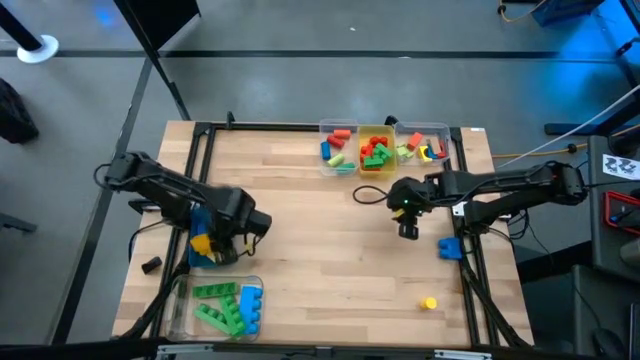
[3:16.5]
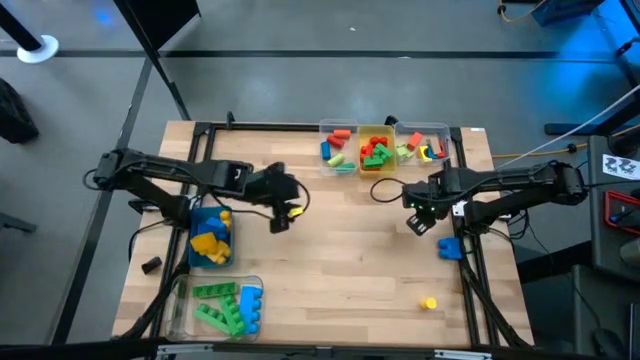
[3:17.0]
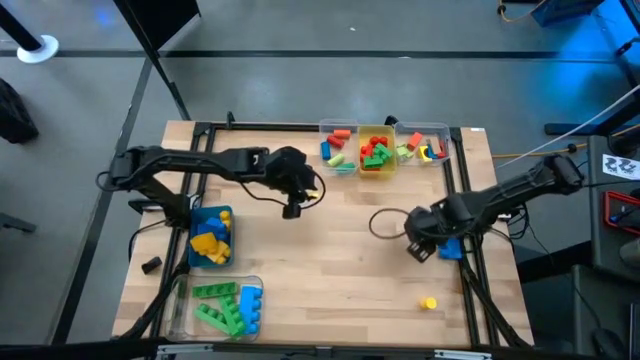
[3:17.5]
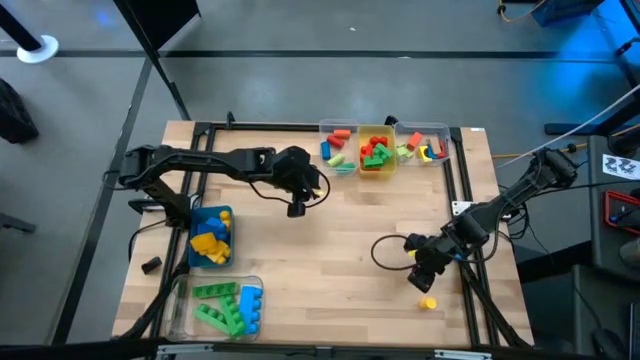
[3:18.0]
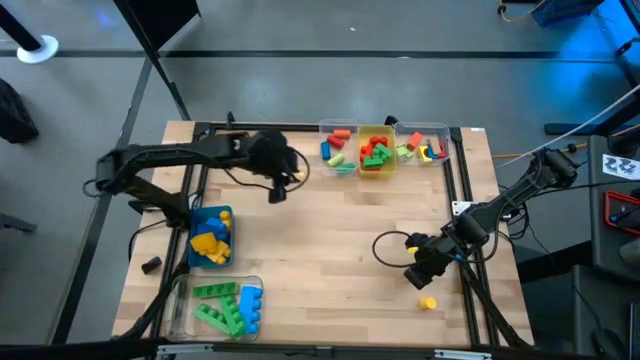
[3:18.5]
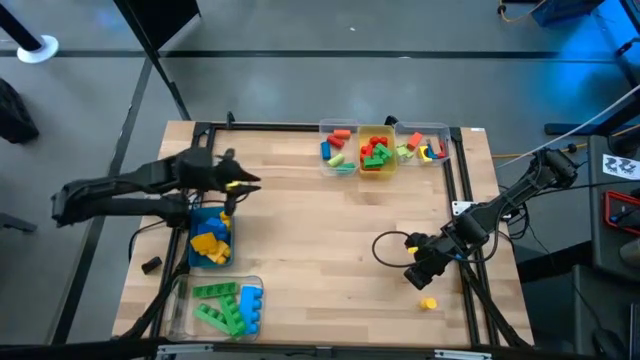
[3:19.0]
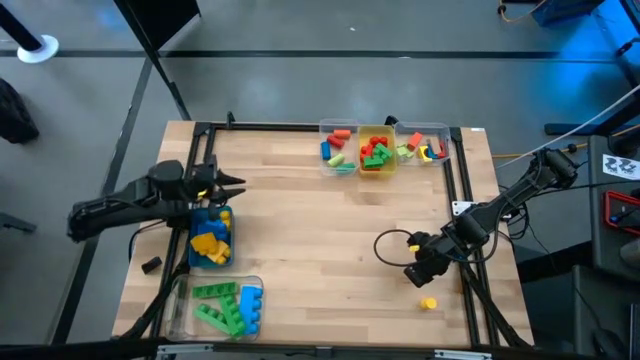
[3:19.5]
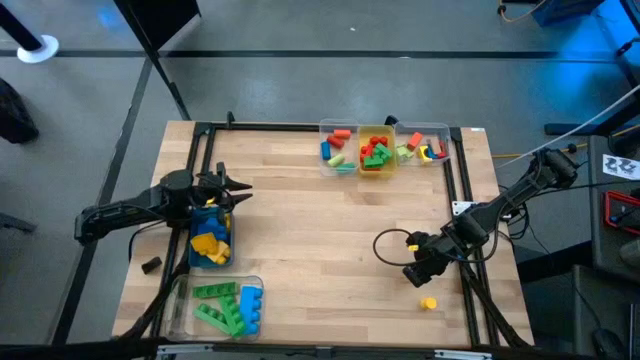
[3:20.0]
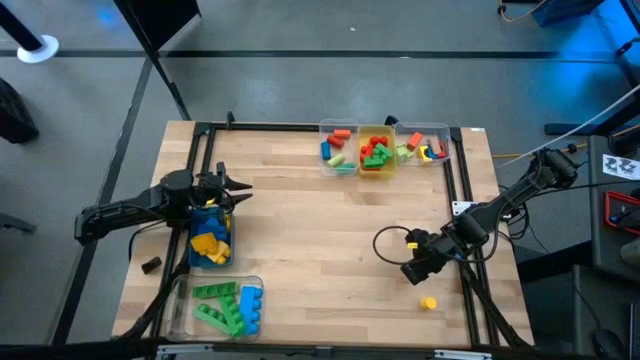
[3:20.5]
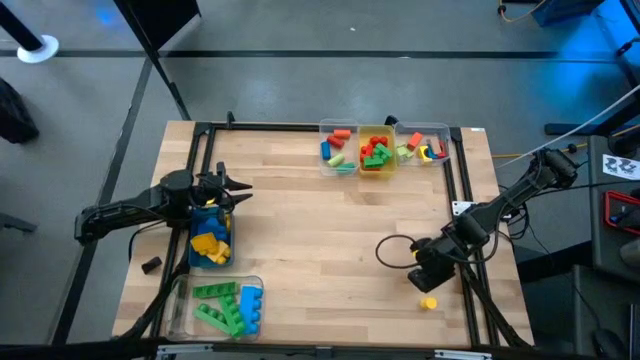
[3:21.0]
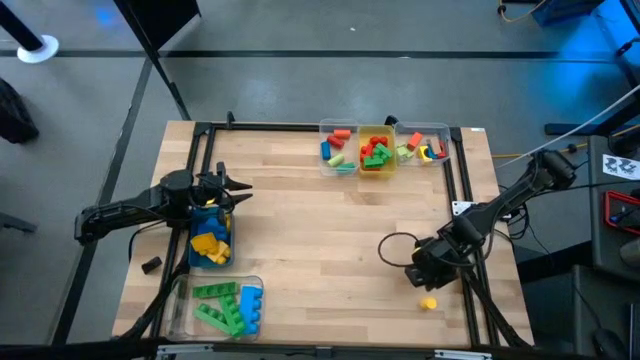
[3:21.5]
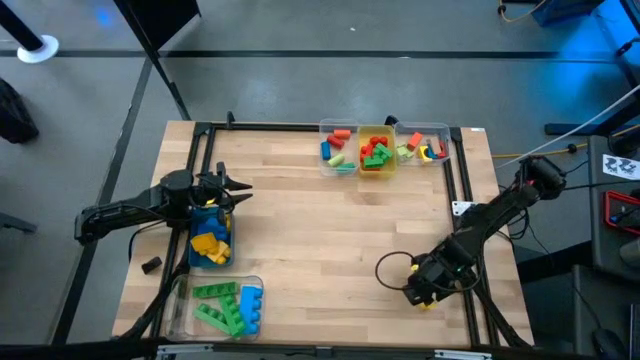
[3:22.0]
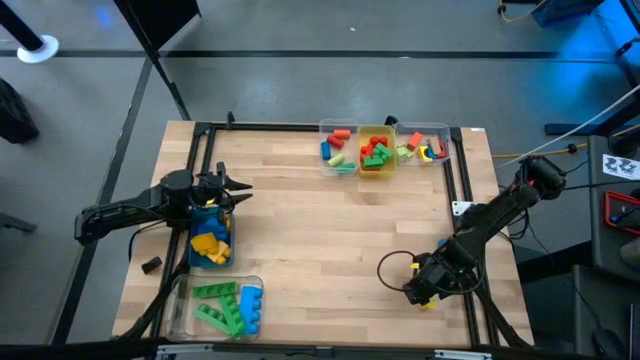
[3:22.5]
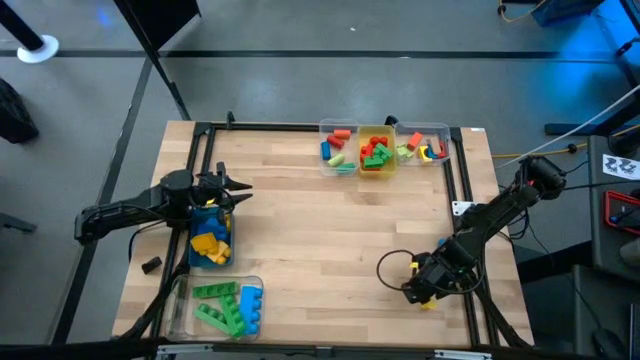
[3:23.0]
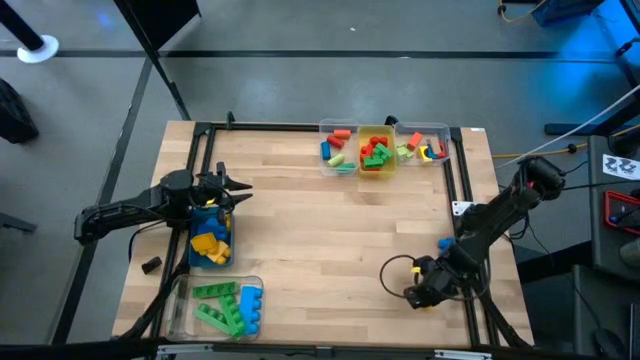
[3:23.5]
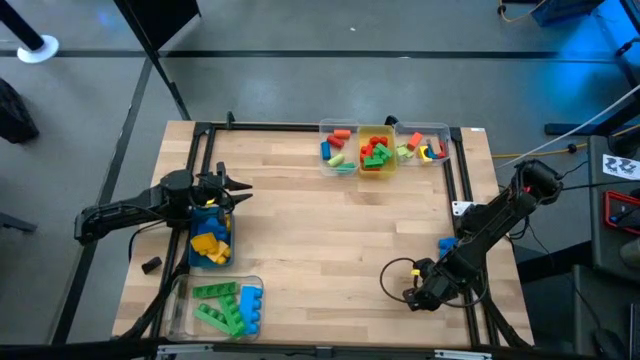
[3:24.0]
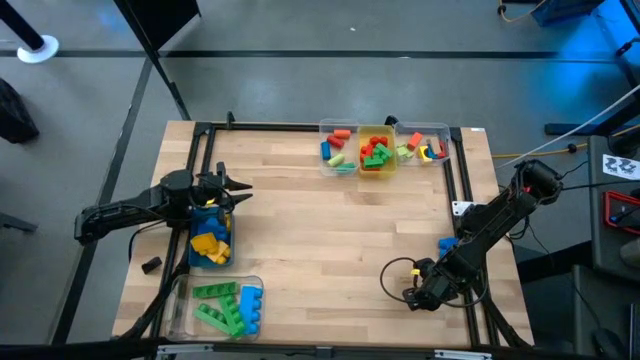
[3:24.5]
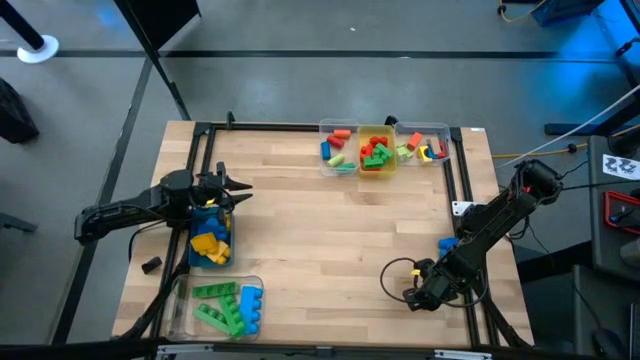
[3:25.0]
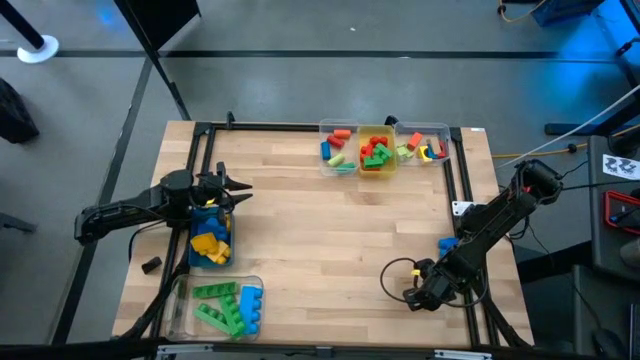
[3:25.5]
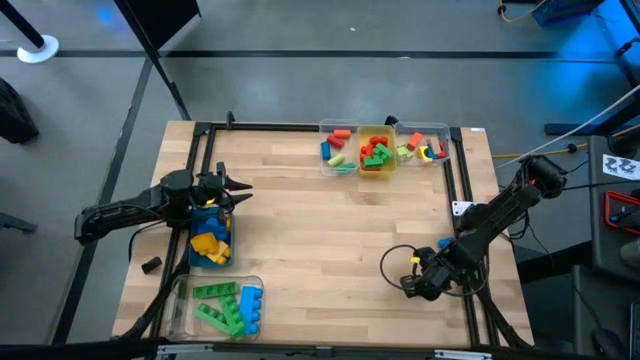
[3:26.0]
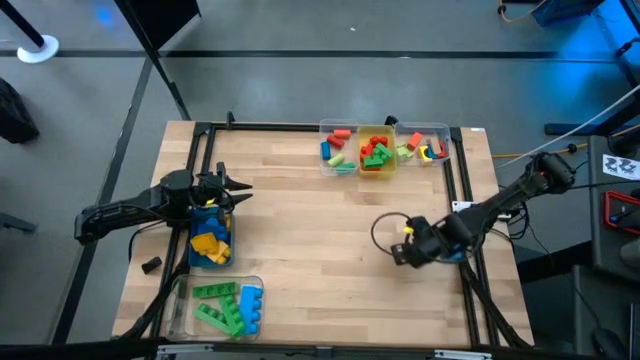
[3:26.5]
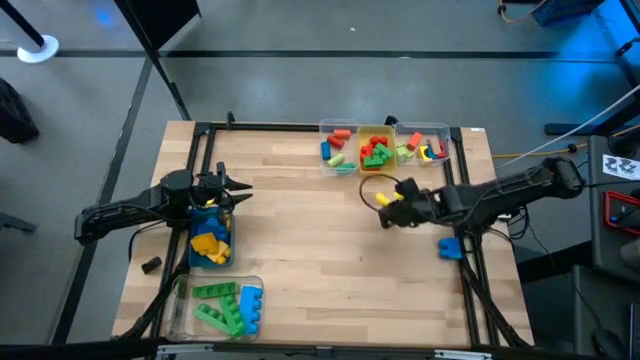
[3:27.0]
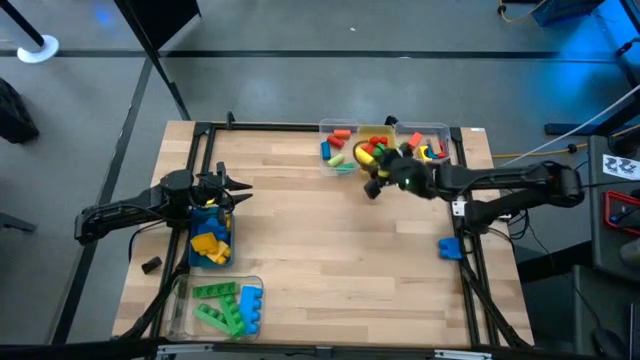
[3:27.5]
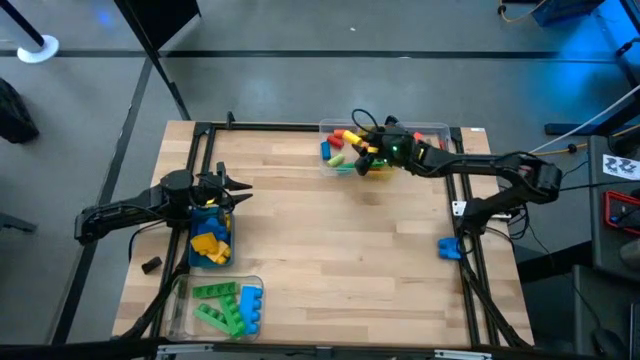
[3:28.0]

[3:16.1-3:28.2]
Task: Sort blocks by size
Put the yellow cylindrical block into the top left transparent bin

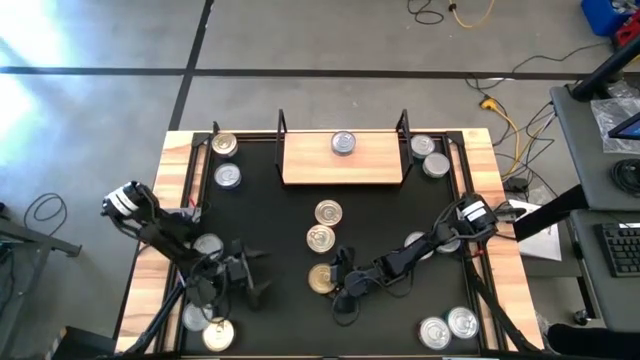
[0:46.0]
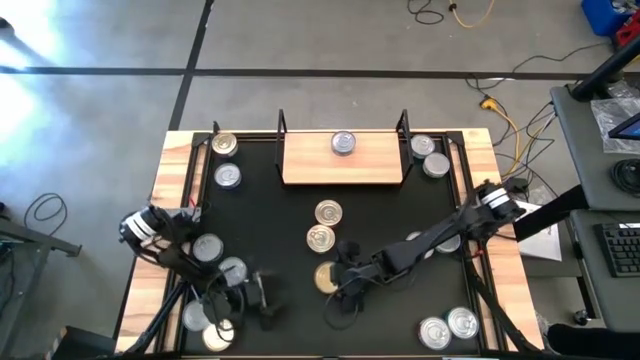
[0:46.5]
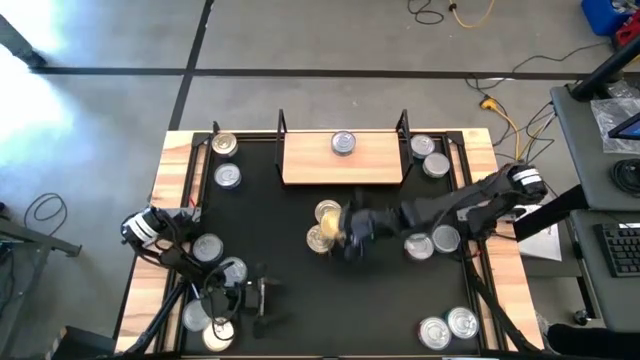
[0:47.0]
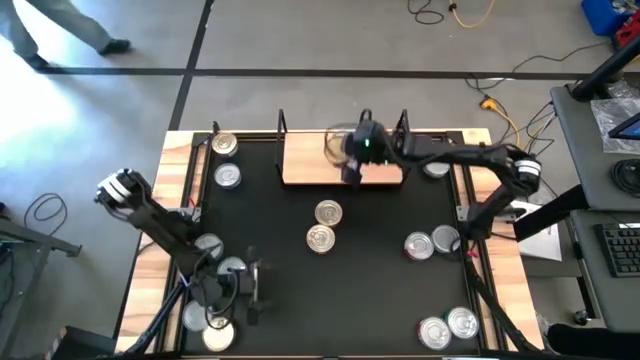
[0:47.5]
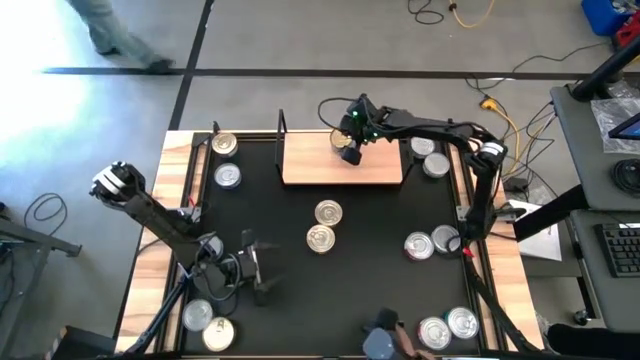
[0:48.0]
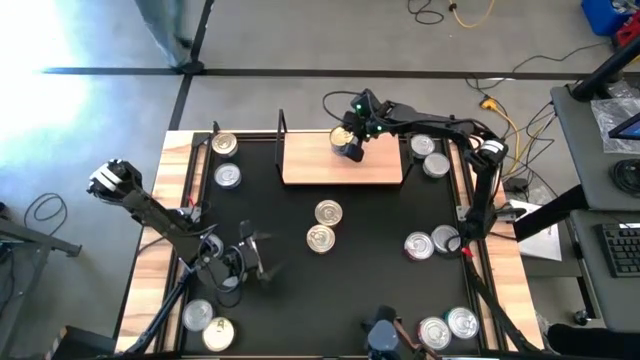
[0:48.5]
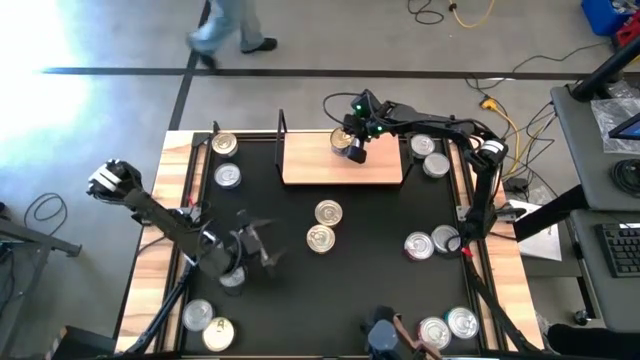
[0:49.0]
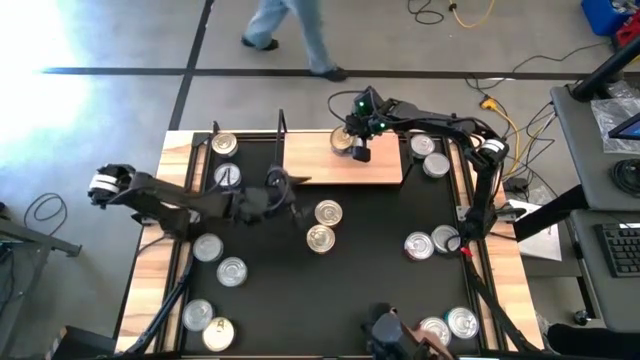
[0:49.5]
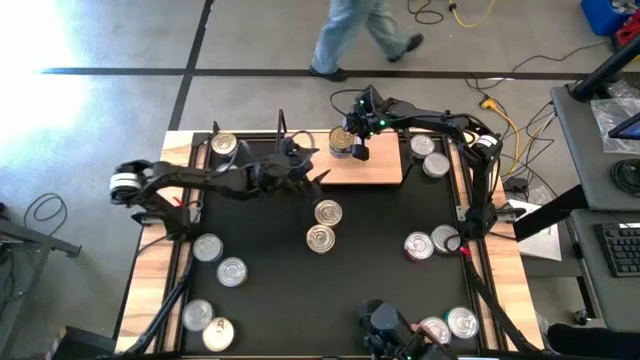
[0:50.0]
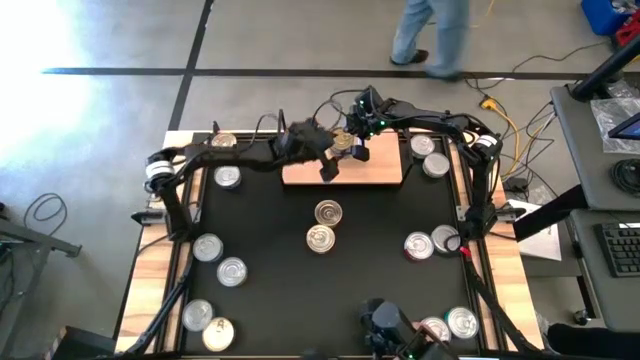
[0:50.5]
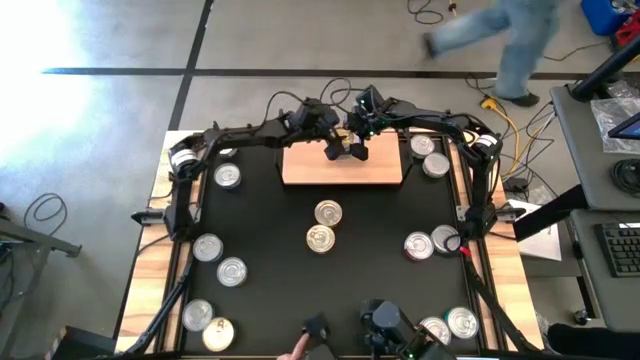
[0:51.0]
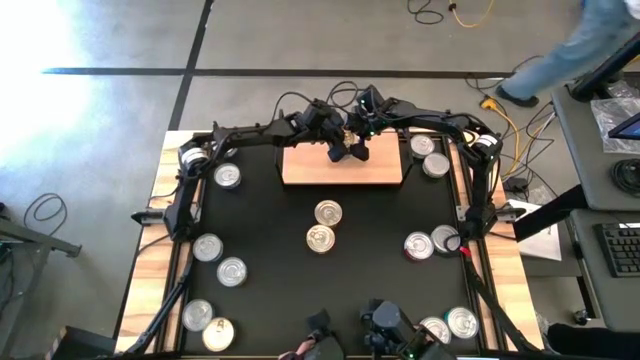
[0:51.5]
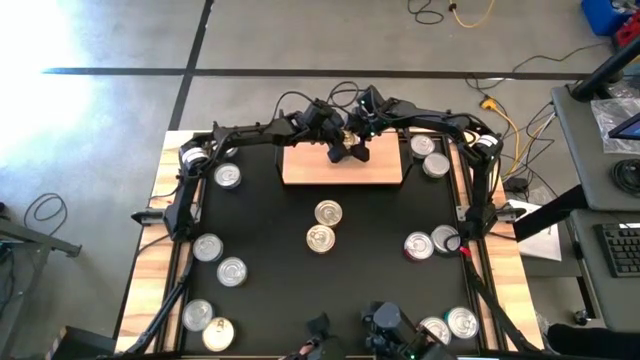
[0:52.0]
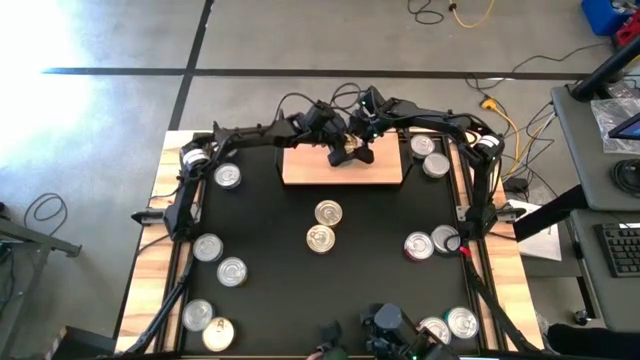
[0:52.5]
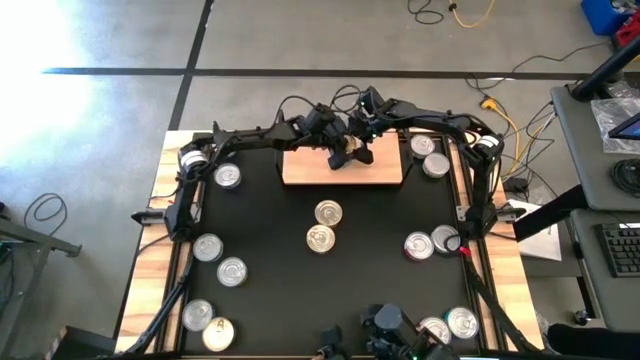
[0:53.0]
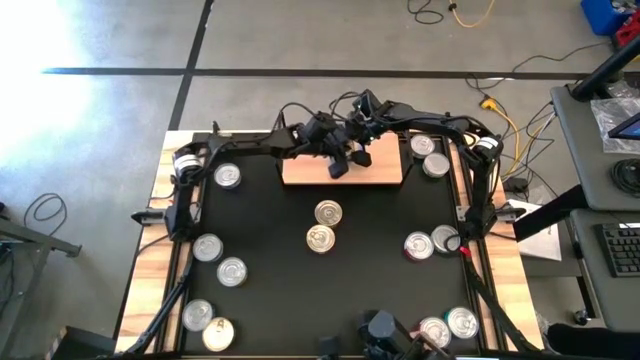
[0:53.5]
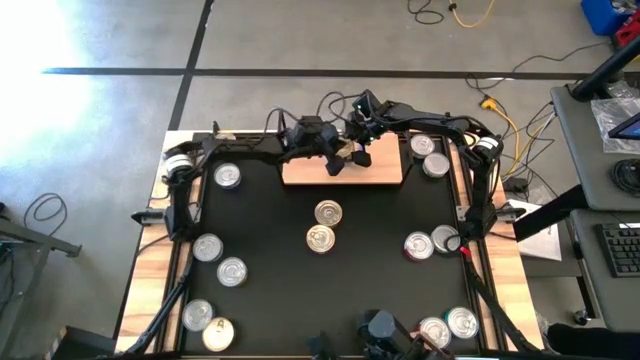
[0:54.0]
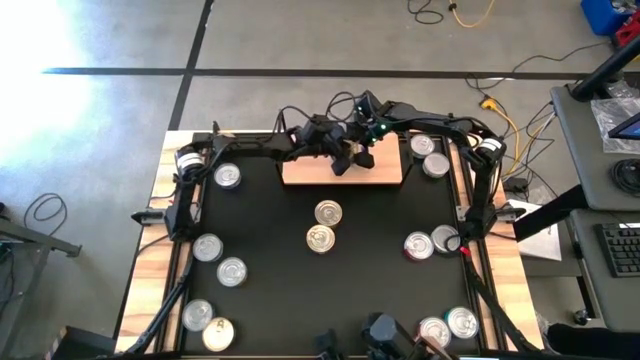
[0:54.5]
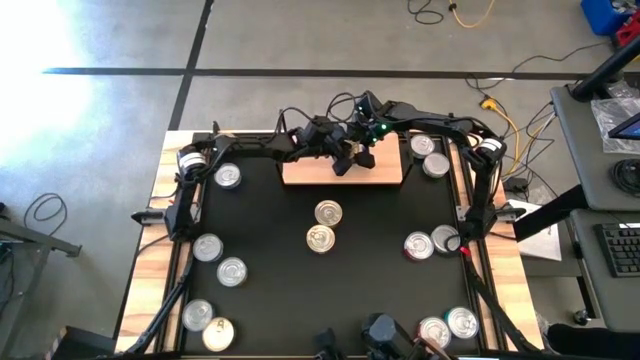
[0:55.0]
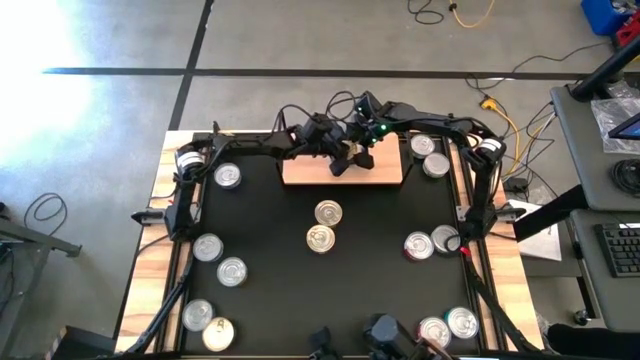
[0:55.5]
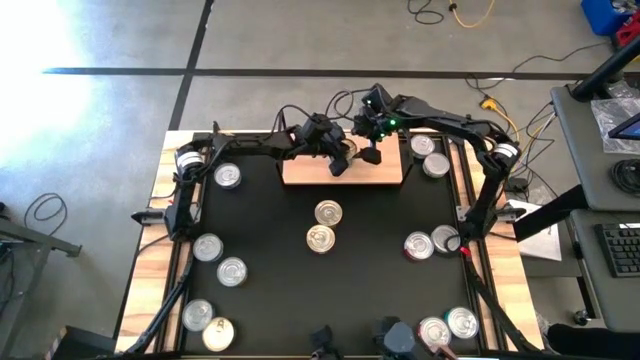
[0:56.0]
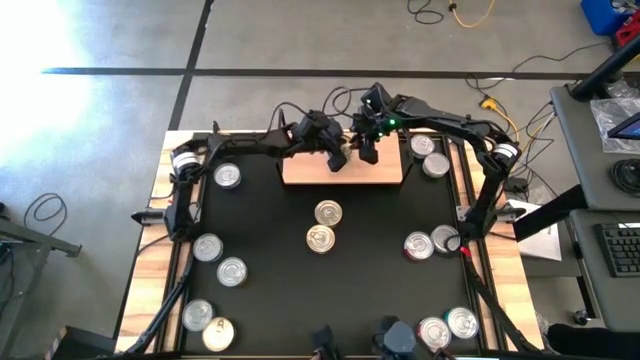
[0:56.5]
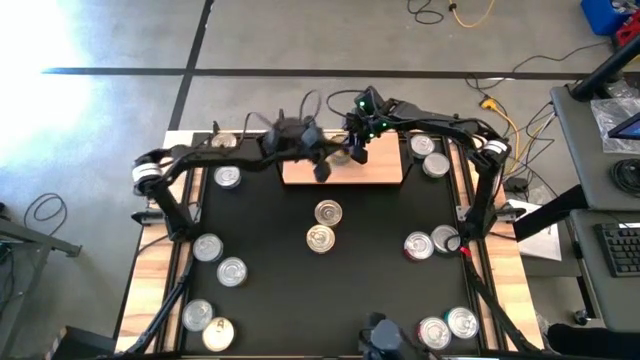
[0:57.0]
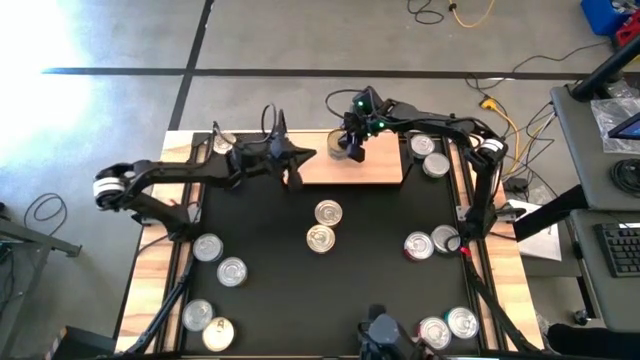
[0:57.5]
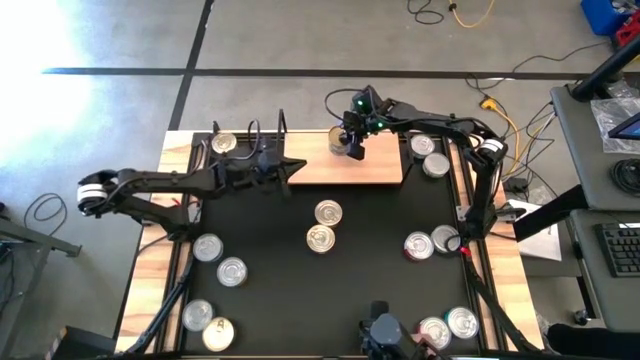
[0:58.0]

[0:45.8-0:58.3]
Task: Stack canned seafood by type on shelf
Stack the green tuna can on top of the other green tuna can on the shelf
